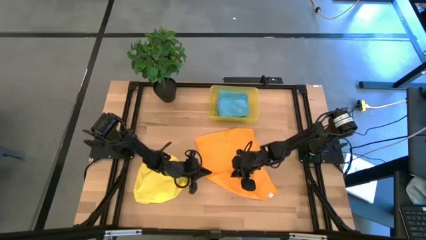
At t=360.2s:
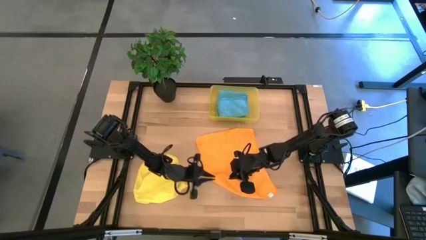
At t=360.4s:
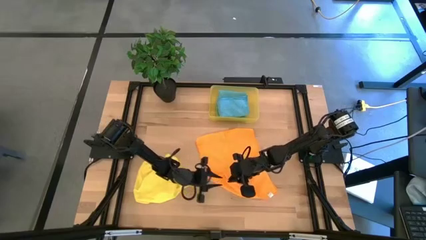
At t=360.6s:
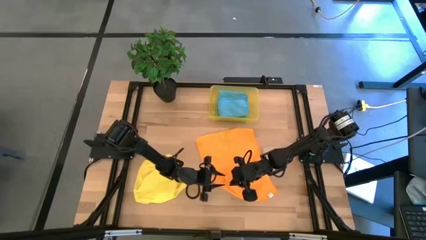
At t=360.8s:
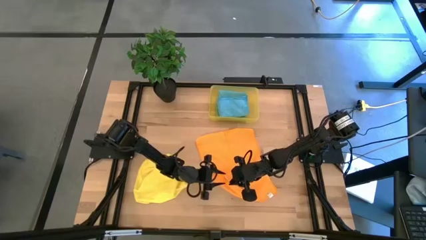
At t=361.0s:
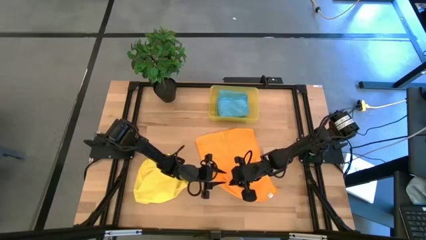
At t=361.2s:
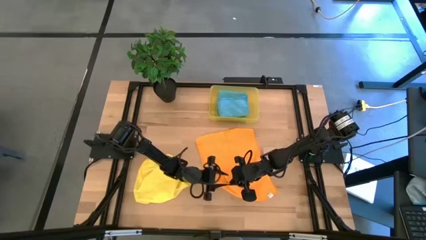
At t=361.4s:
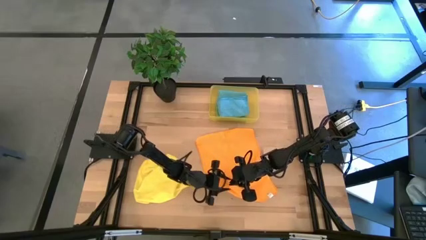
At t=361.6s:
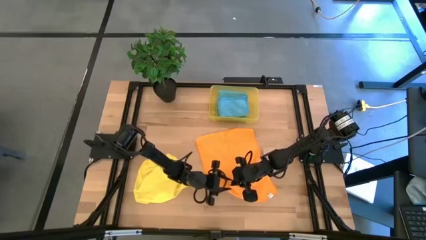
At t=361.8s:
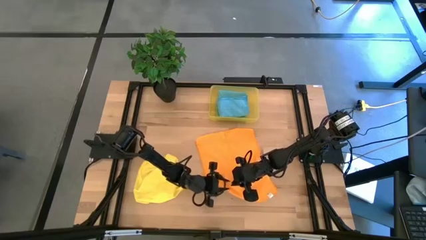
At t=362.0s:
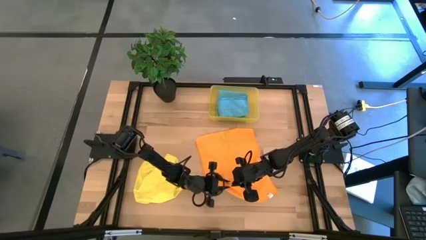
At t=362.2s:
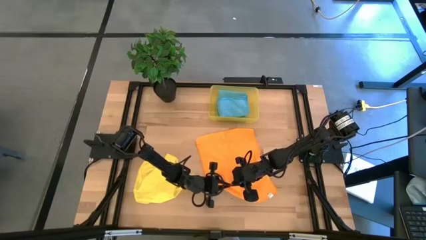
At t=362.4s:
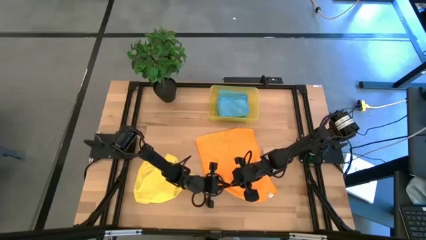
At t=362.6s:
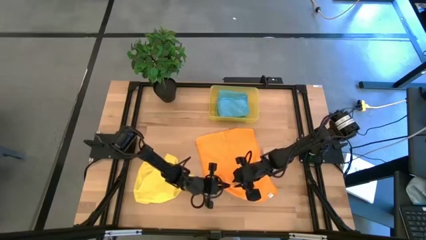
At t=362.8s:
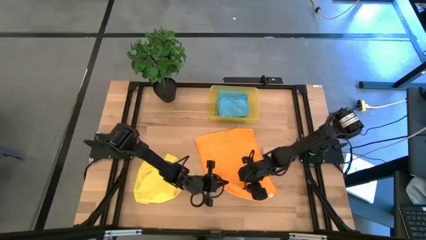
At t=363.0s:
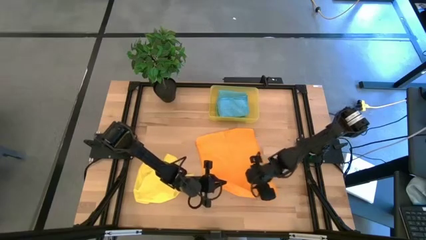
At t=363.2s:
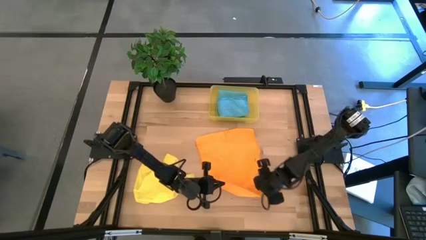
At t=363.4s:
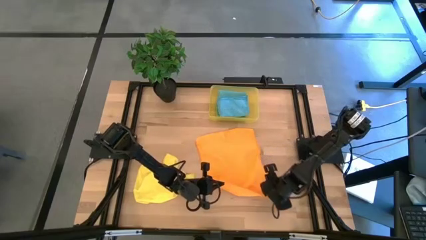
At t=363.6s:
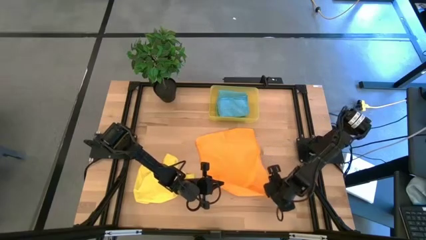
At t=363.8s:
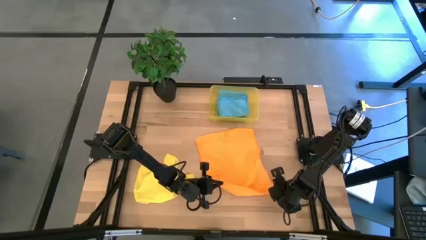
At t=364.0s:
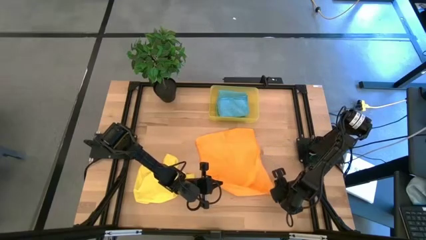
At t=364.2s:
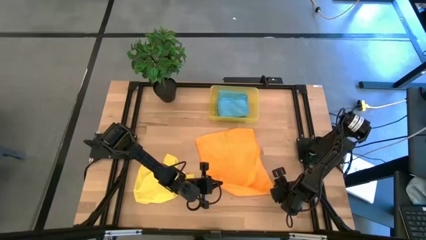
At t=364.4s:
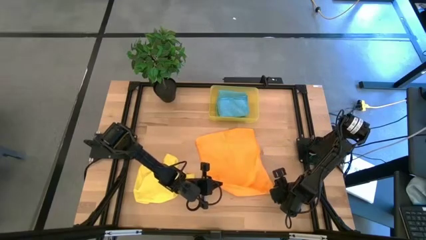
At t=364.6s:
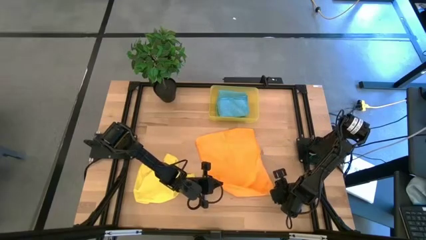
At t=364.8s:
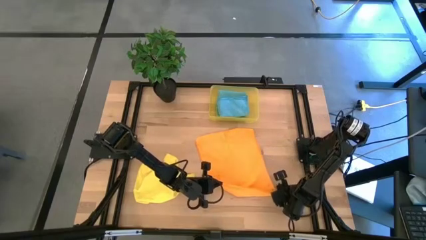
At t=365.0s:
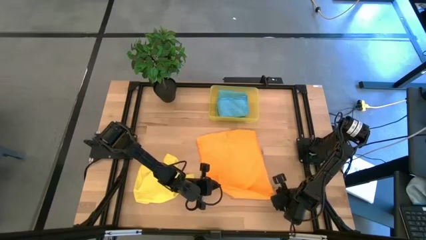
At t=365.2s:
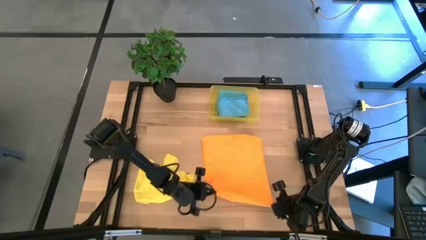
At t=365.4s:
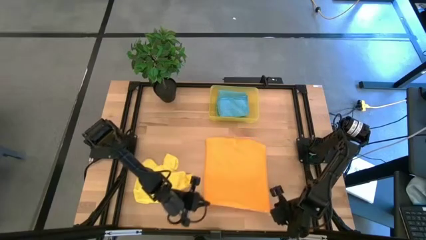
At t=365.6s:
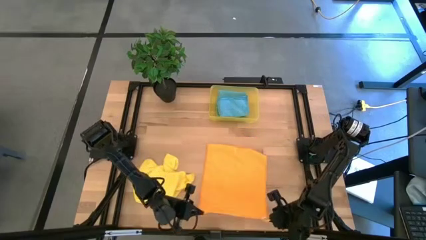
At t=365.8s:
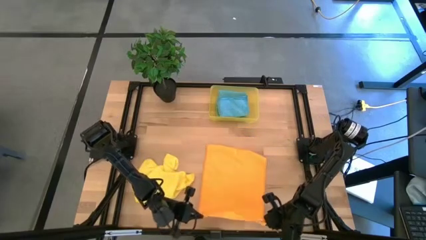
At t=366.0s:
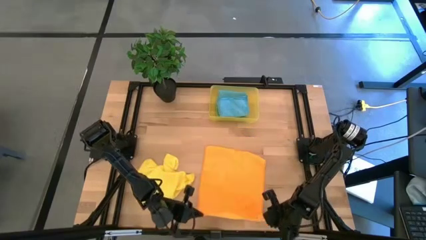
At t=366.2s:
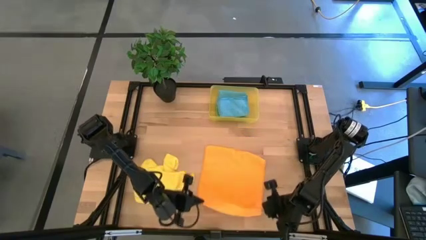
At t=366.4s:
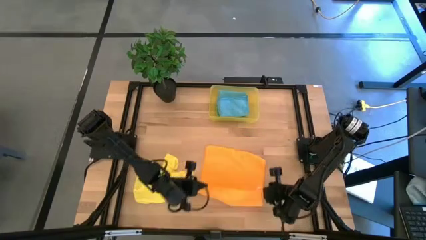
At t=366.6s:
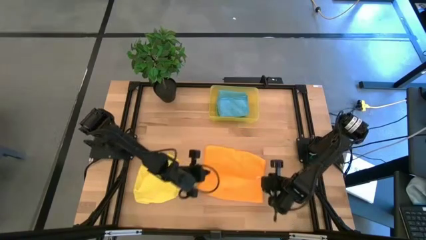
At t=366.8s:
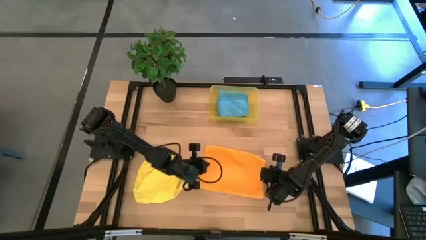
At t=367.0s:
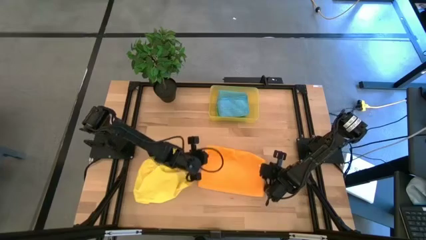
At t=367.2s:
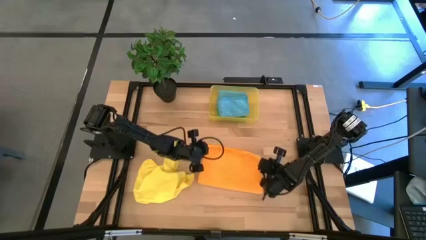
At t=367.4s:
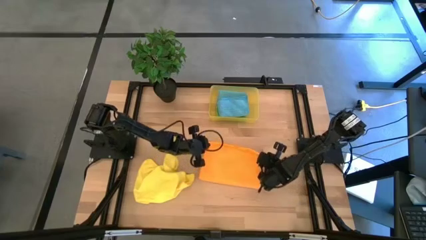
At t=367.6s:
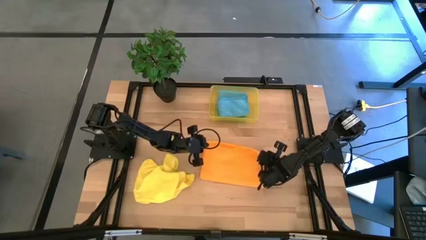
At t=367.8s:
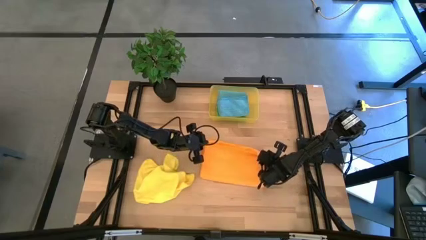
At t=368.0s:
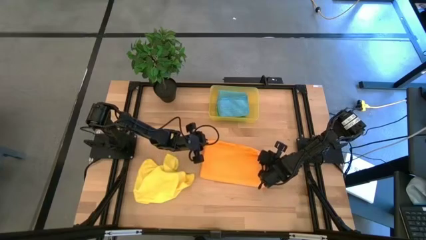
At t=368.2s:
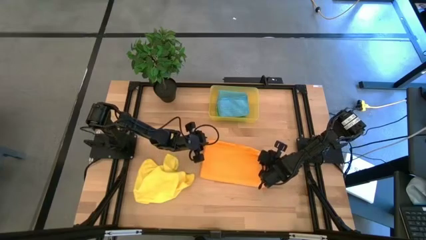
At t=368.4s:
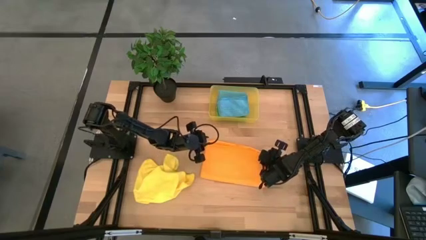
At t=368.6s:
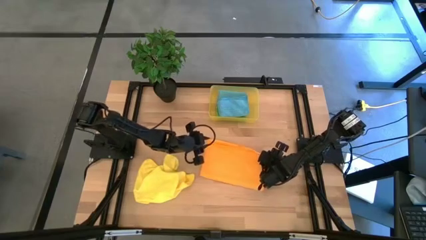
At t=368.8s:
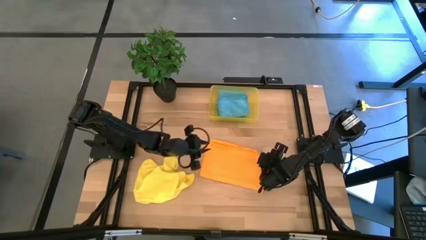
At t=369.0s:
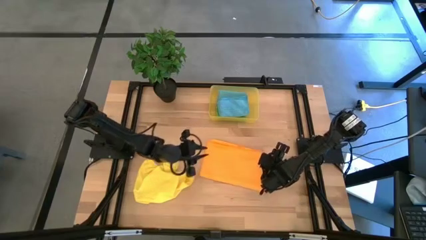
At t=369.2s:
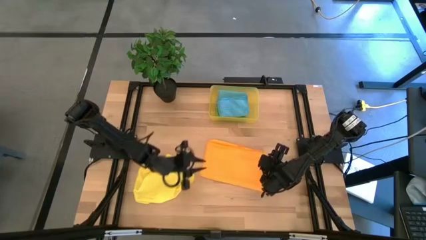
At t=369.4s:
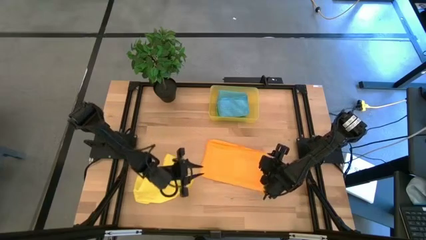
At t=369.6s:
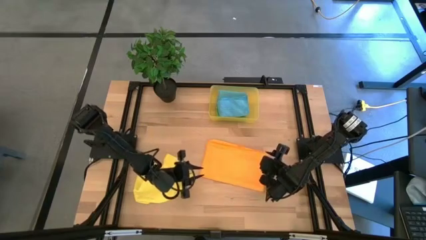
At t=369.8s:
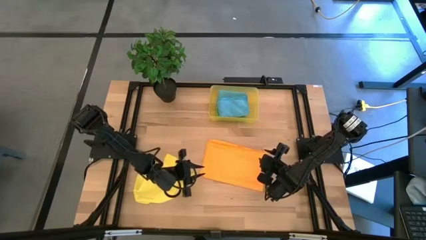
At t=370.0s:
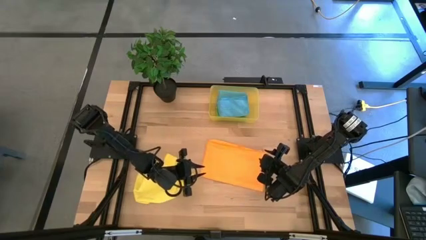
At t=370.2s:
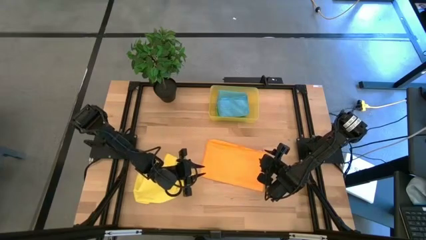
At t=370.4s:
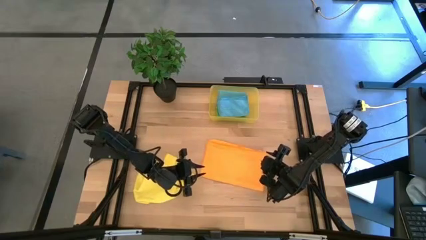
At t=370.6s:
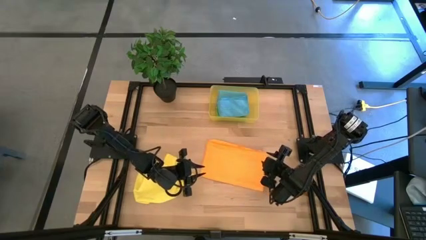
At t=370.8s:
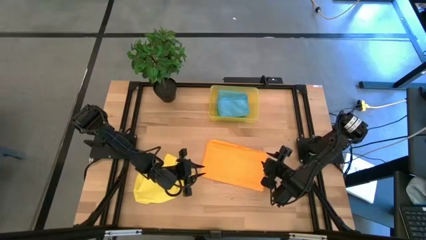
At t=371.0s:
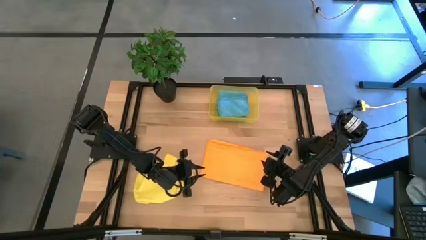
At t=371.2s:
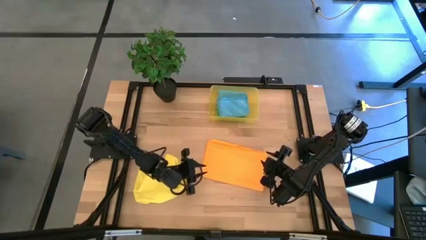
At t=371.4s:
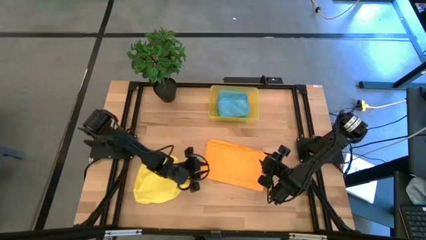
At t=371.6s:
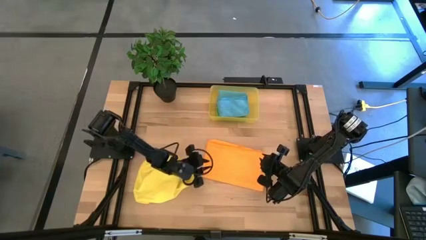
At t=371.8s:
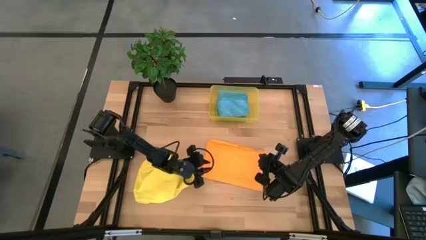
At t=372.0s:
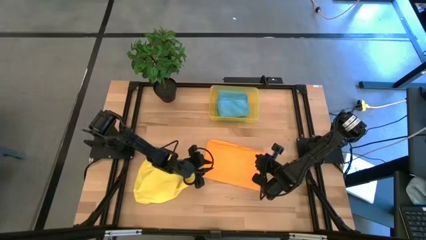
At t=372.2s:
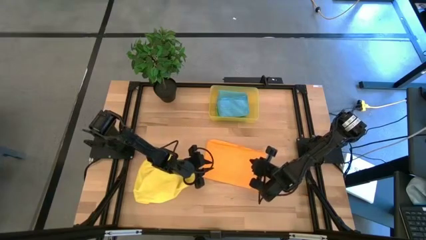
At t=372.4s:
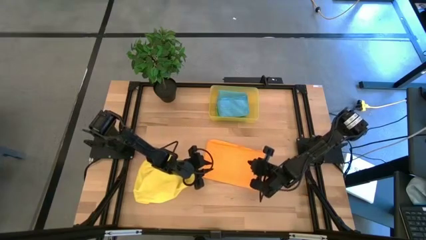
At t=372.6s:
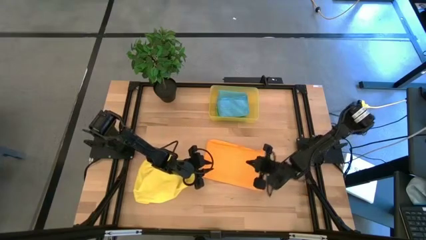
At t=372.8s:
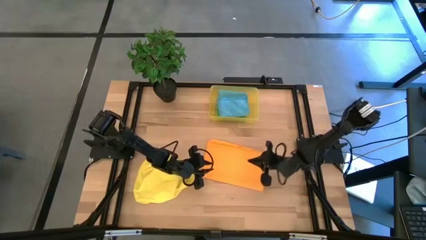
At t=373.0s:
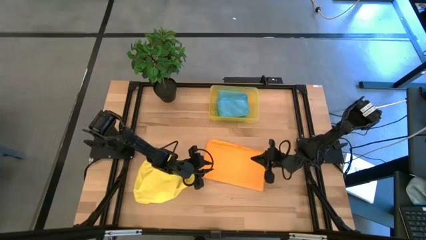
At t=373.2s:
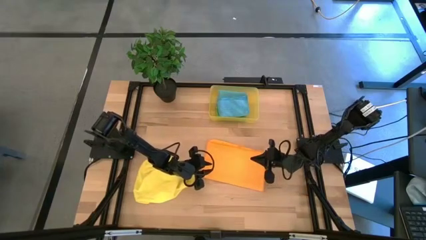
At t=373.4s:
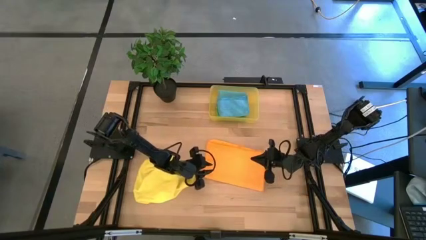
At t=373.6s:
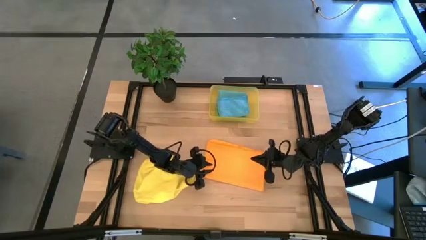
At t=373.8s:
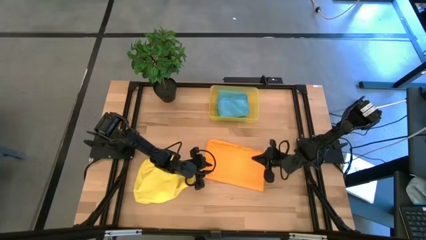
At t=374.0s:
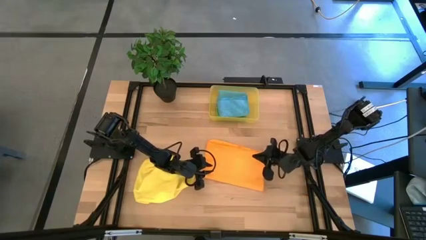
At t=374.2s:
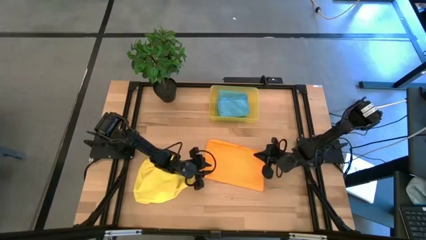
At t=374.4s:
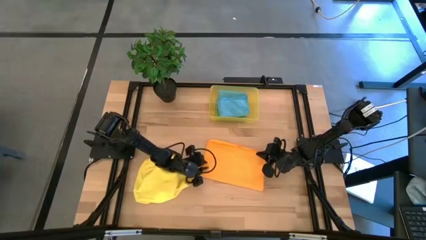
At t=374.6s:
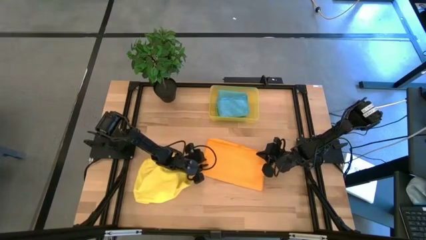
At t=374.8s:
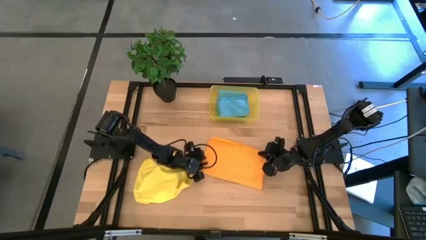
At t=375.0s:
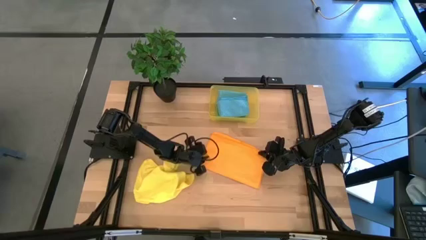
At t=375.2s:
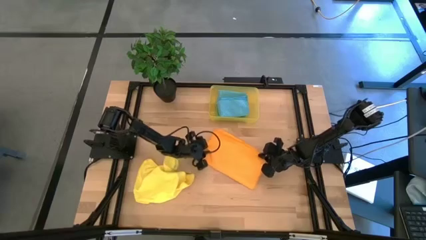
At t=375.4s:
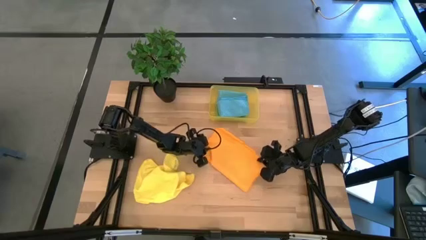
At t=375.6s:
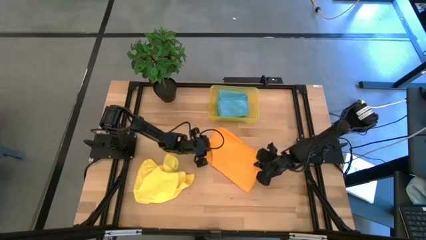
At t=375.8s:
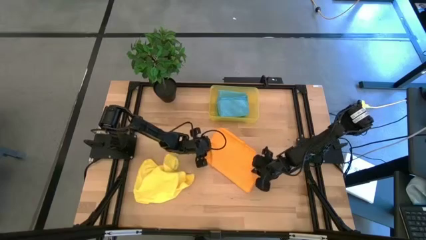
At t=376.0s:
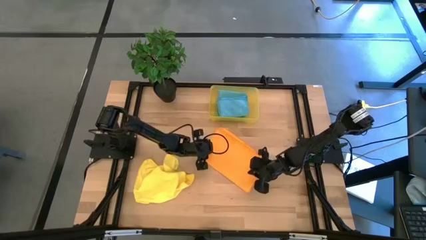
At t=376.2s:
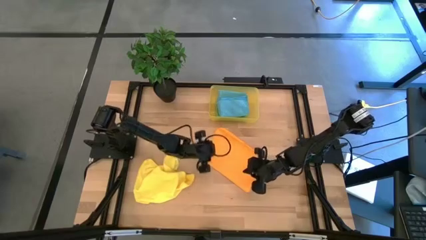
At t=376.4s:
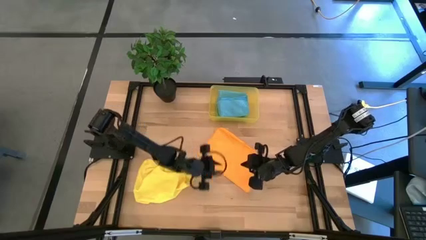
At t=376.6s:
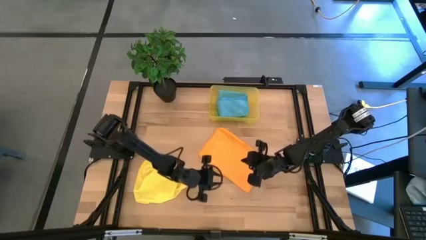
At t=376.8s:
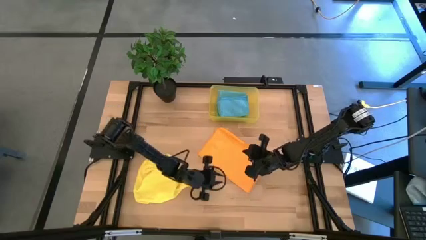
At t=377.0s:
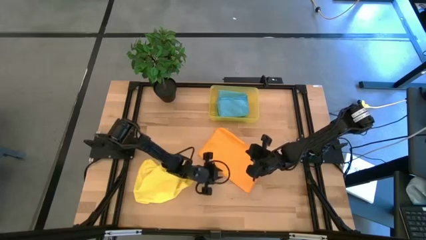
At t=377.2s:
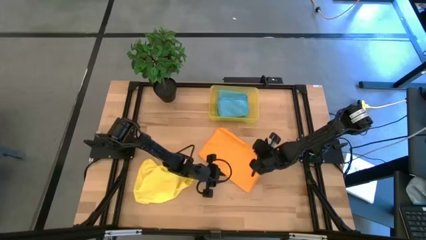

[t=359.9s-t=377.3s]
Task: Fold microfiber towels
Fold the orange microfiber towel
